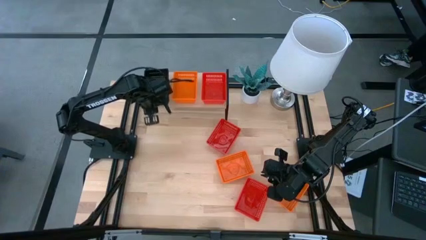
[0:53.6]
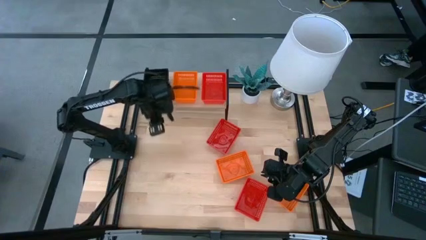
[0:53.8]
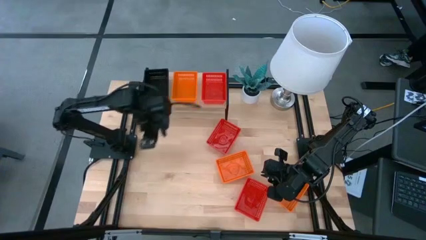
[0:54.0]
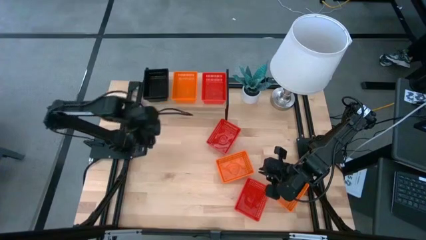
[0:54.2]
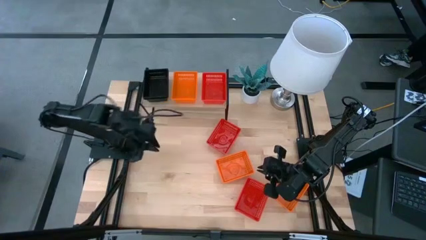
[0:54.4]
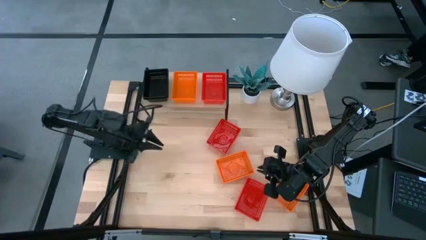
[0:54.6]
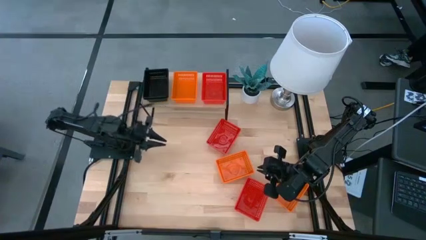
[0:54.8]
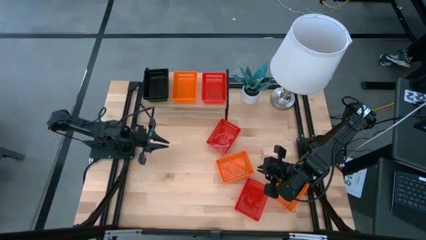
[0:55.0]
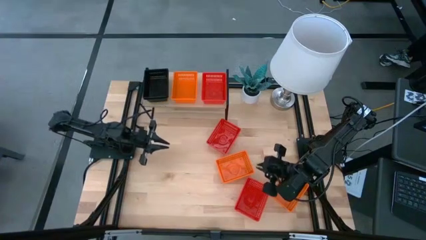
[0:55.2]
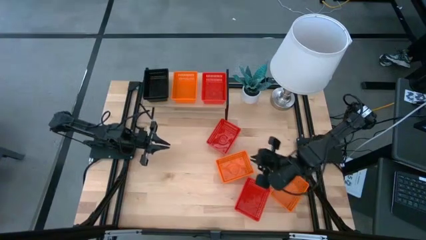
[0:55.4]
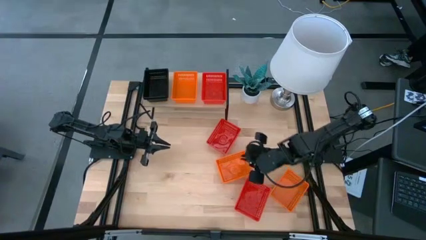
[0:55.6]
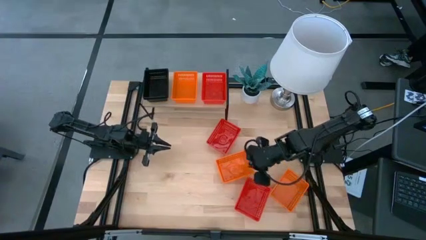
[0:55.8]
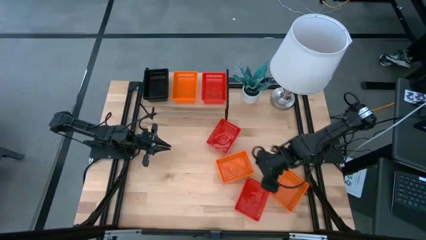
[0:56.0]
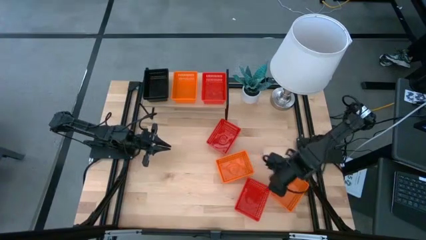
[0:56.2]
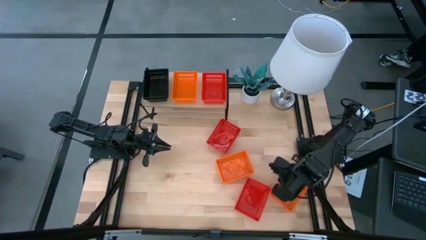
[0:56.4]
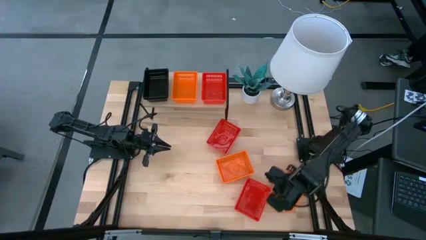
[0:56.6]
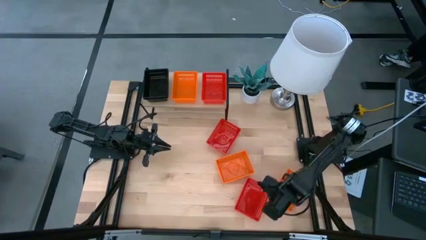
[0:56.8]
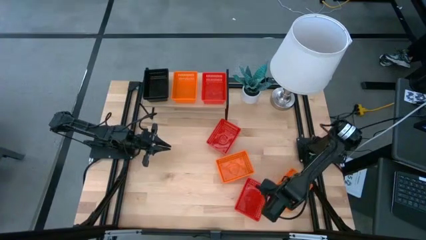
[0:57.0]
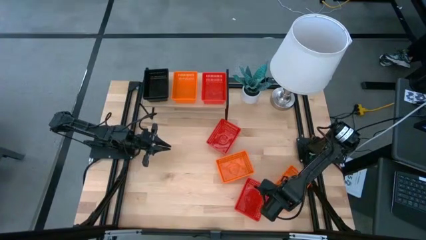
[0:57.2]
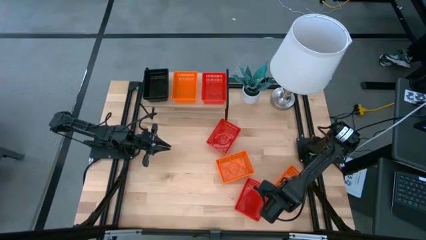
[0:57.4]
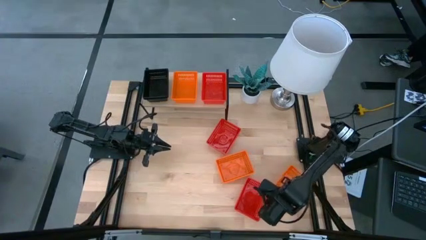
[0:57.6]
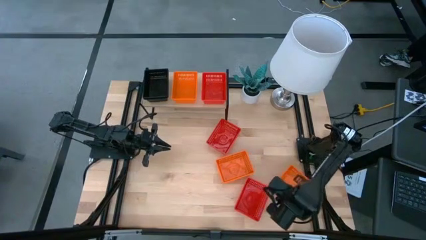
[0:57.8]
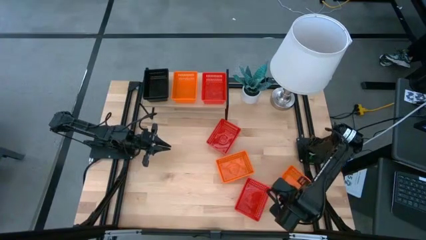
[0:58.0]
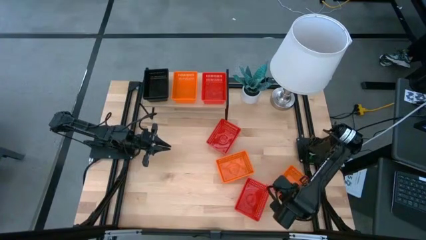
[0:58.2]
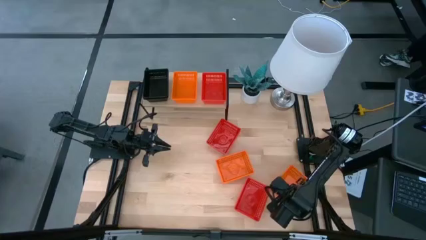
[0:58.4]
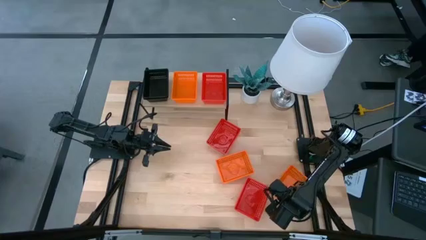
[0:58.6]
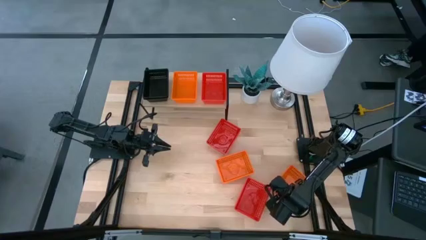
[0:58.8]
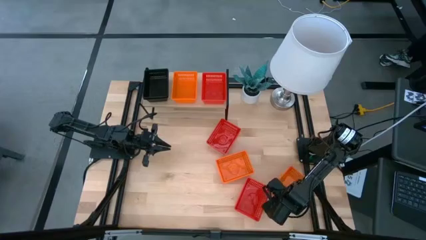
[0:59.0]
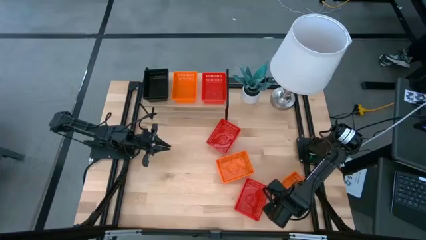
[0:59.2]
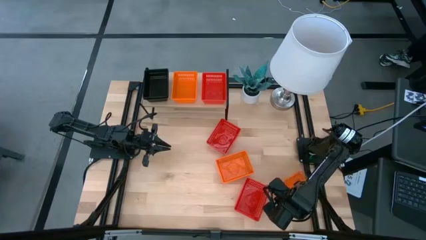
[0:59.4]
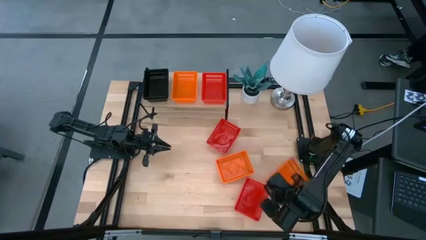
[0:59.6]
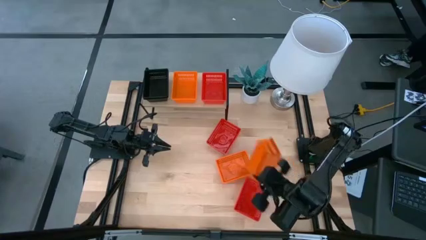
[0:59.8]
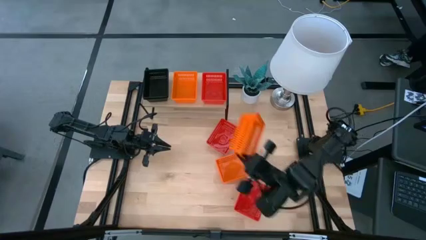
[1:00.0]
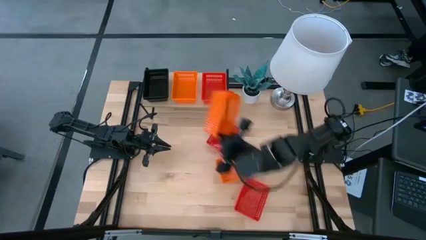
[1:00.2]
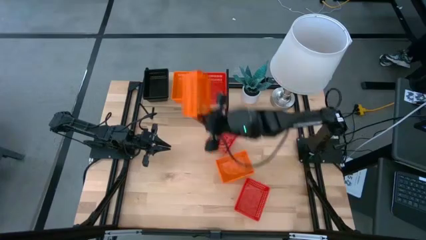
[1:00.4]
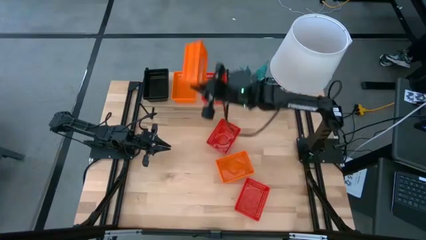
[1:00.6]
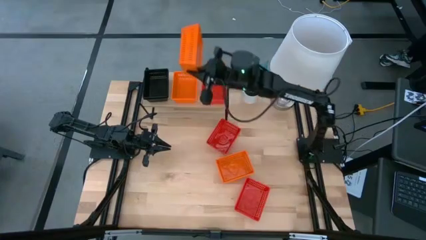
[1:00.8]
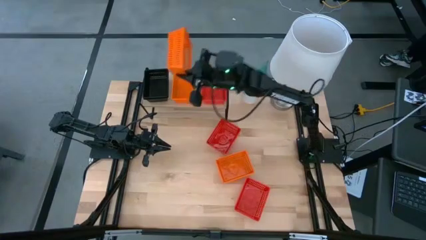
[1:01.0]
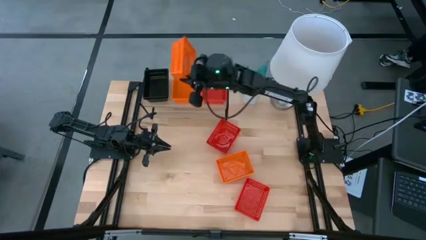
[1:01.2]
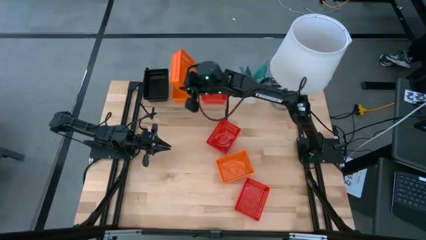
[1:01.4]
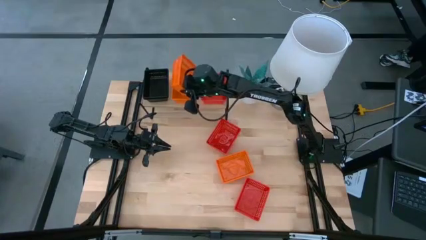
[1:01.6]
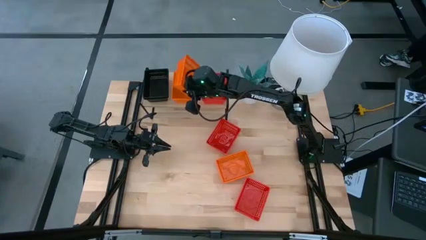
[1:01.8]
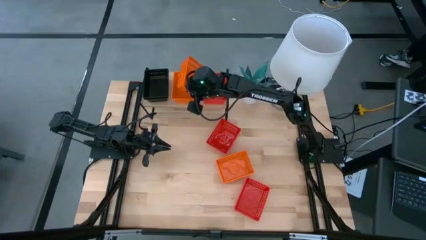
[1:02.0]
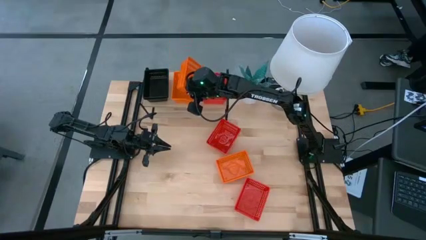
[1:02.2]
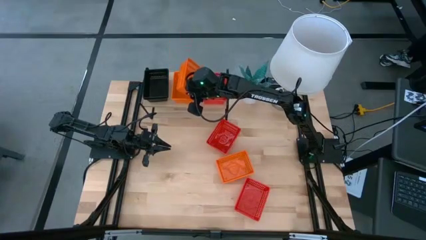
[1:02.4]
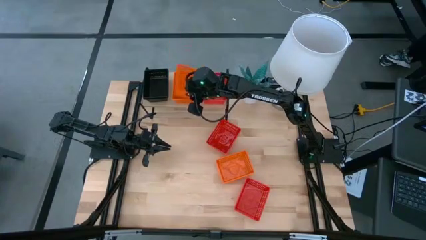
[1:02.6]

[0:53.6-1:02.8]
Task: Stack baskets on shelf by color
Stack the right orange bin on top of the other orange bin on the shelf

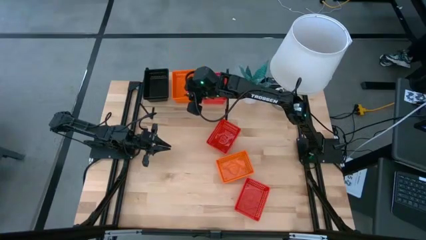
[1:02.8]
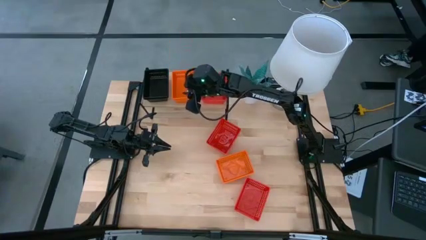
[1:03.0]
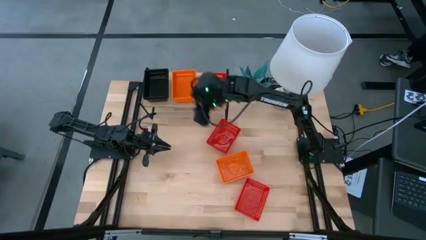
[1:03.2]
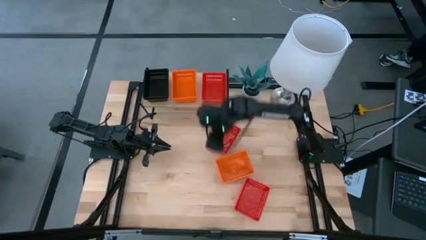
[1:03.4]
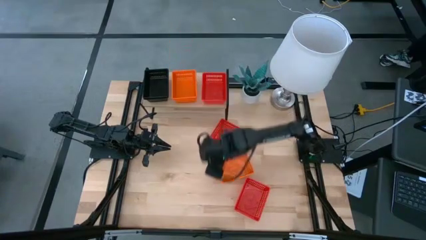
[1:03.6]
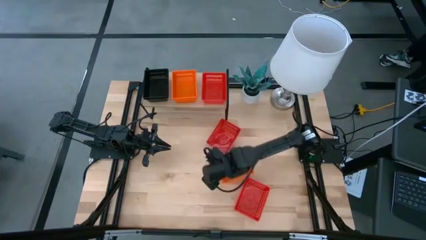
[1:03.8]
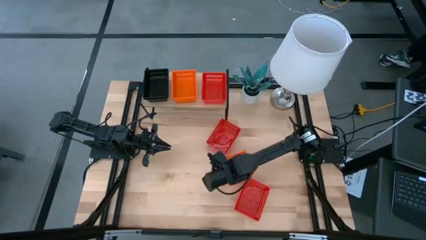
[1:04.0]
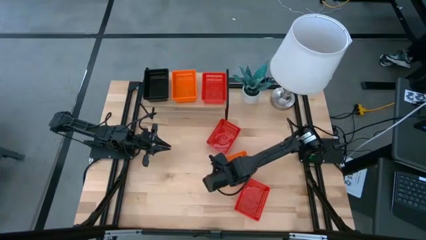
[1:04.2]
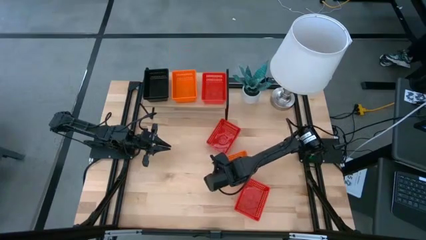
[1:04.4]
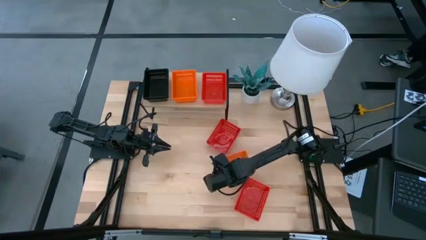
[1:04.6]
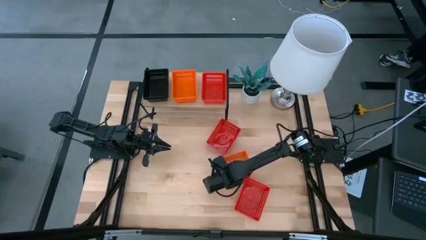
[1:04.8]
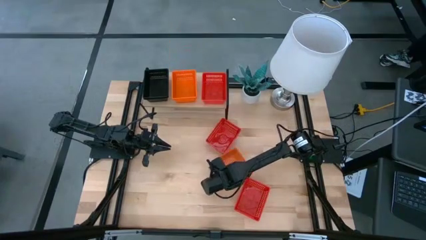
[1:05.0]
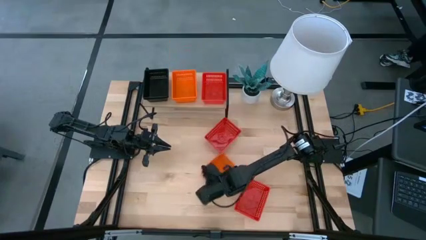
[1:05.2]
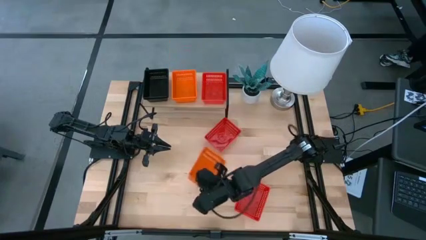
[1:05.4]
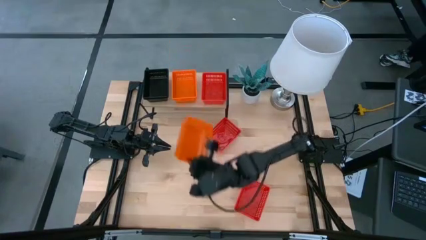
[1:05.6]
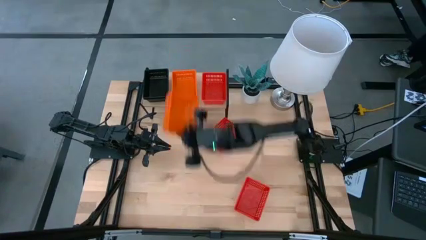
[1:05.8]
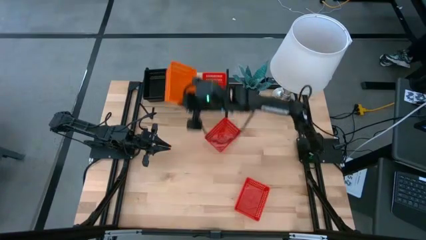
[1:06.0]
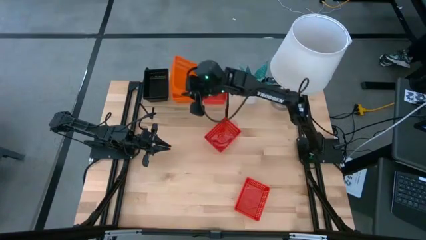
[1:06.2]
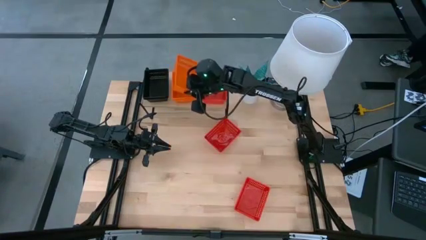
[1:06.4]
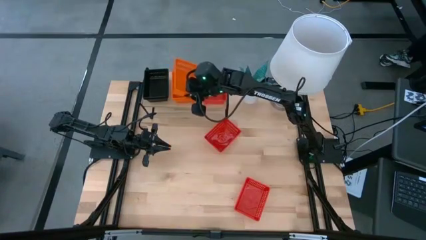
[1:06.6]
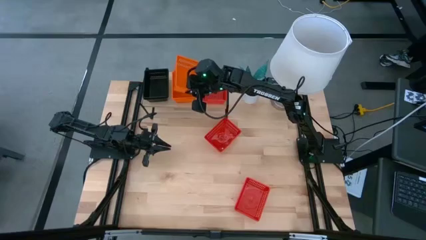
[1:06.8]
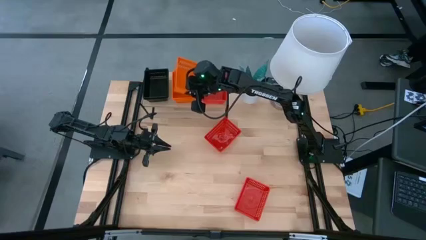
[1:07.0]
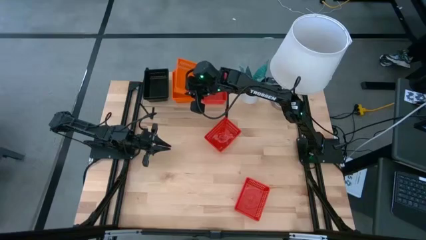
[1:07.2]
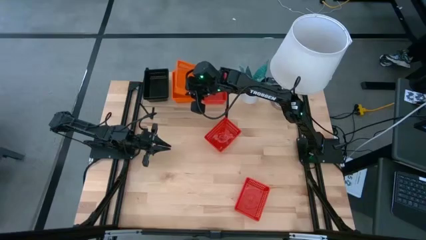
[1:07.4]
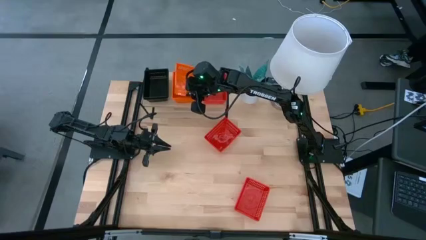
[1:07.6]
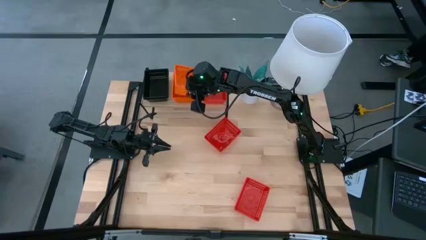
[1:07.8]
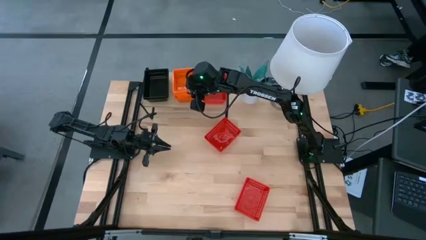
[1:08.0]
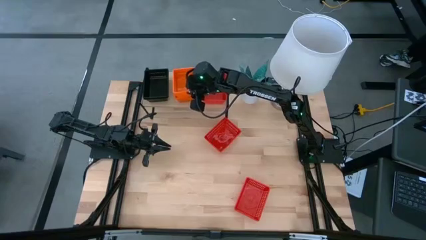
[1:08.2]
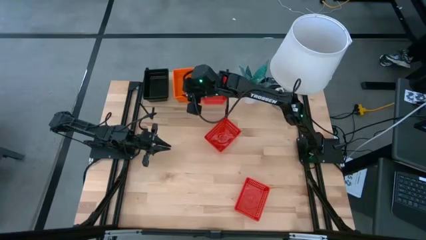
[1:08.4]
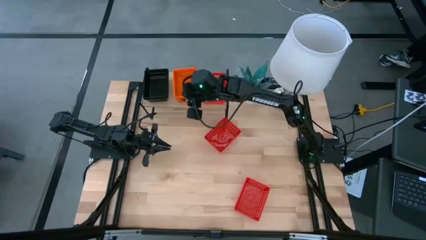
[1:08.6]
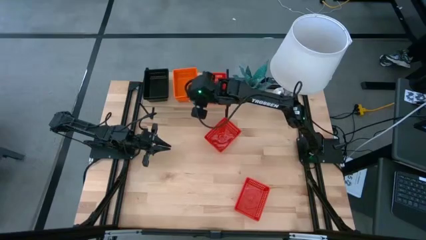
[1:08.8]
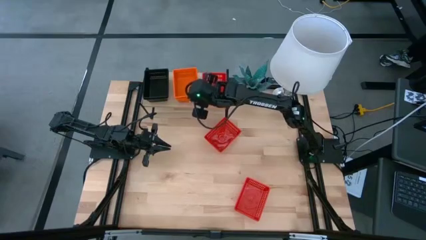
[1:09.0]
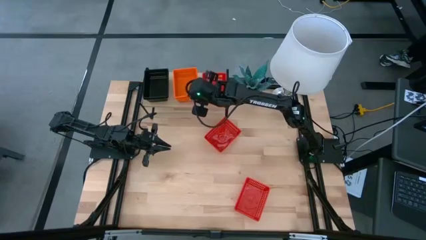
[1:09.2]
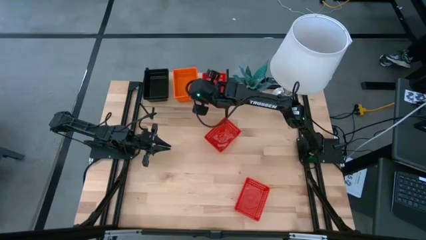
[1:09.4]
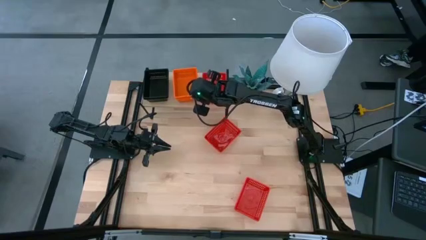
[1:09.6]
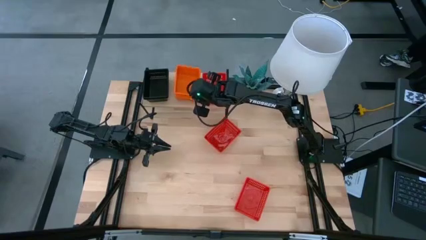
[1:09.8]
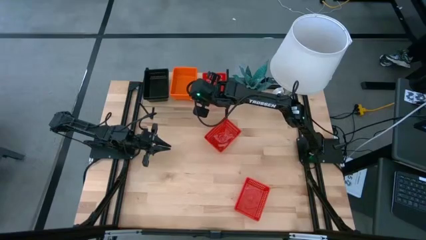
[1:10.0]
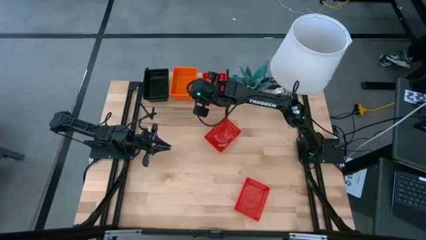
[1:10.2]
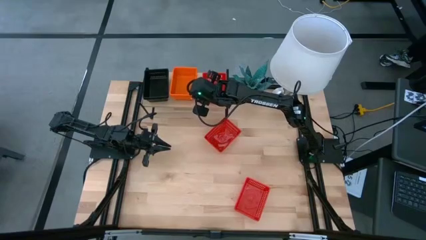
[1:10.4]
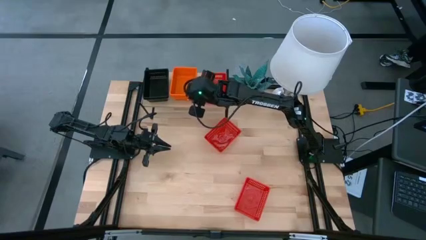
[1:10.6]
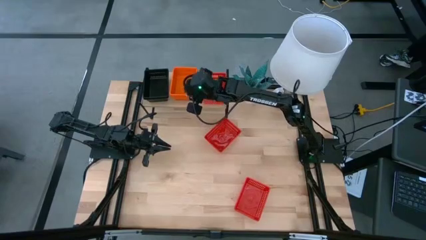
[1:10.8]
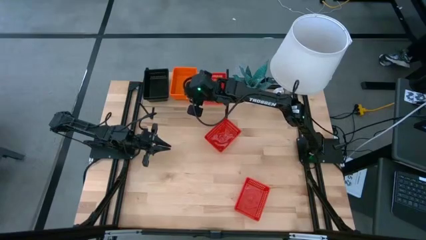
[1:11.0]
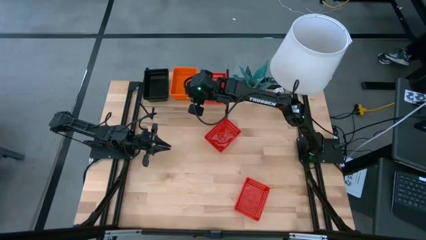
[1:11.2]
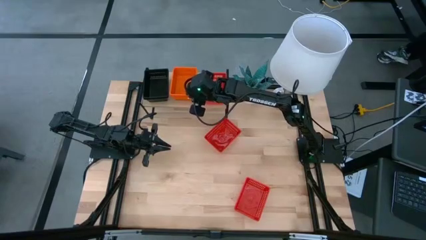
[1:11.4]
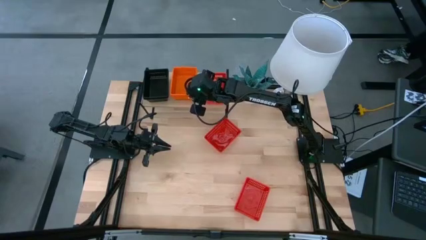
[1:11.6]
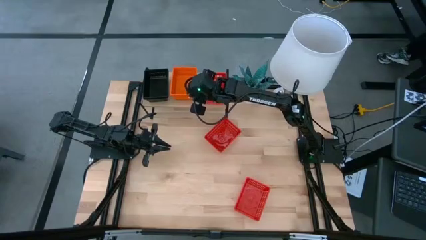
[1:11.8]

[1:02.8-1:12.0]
Stack the orange bin on top of the other stacked orange bins on the shelf
